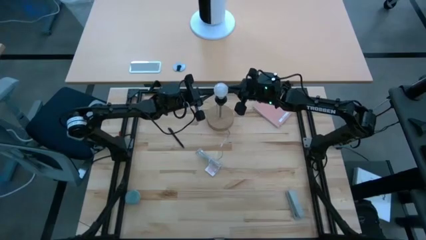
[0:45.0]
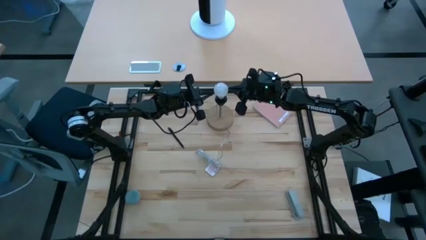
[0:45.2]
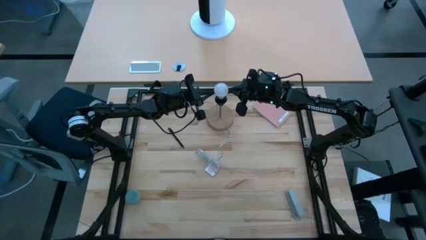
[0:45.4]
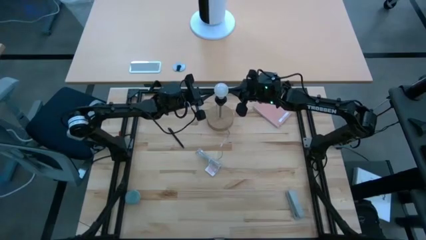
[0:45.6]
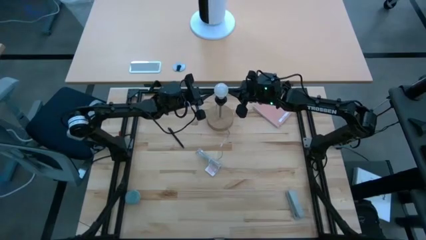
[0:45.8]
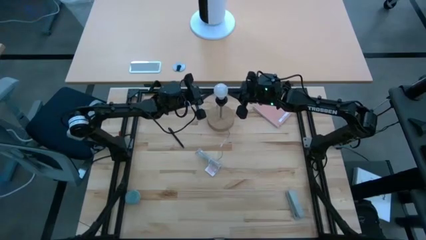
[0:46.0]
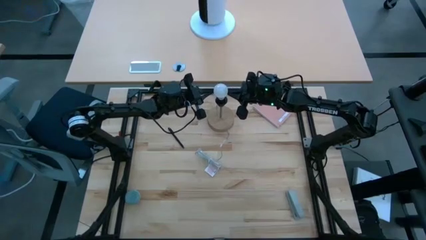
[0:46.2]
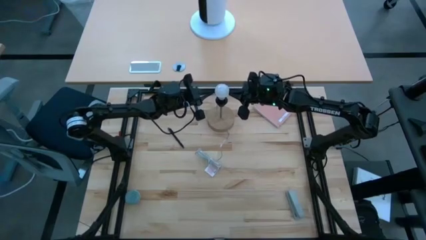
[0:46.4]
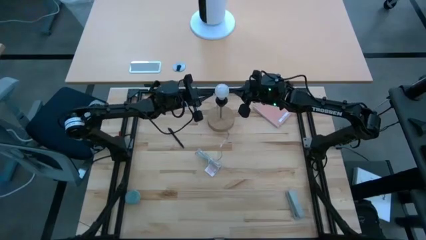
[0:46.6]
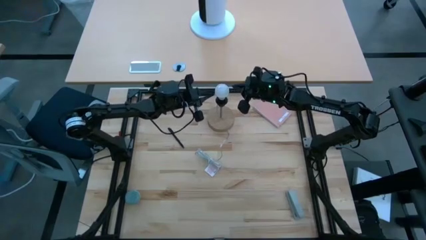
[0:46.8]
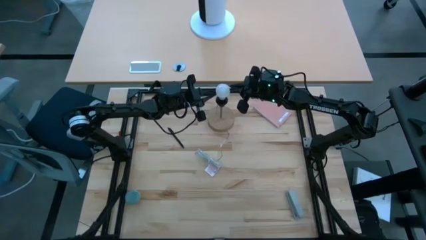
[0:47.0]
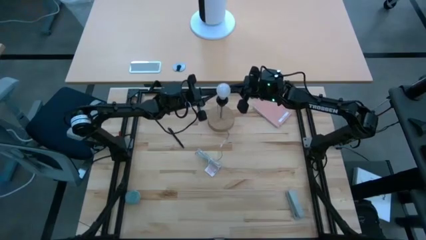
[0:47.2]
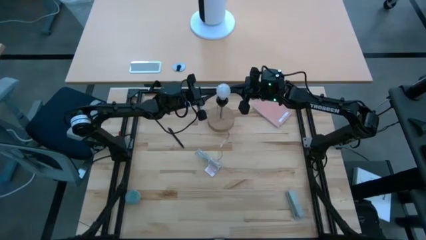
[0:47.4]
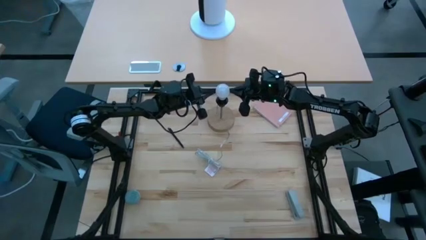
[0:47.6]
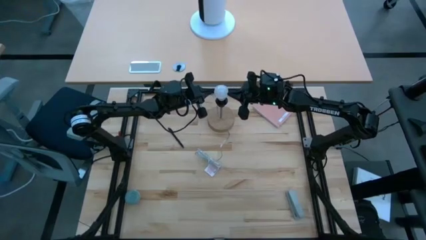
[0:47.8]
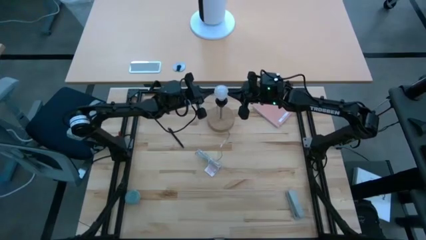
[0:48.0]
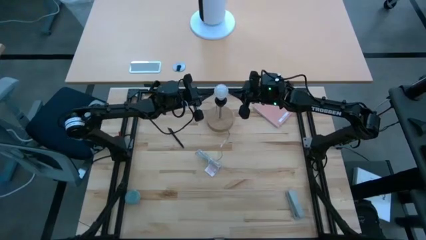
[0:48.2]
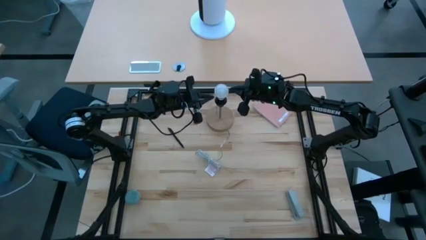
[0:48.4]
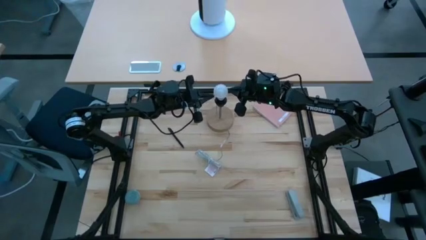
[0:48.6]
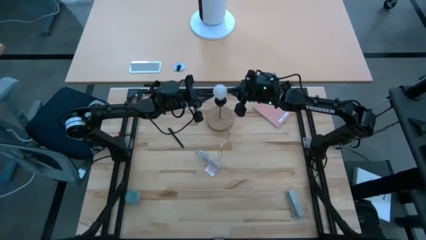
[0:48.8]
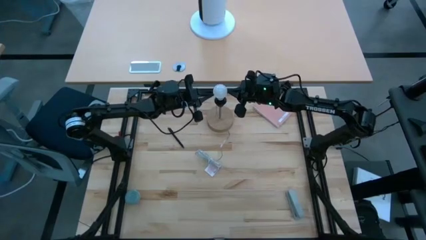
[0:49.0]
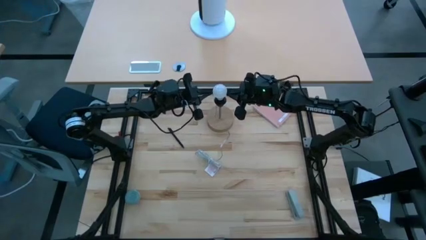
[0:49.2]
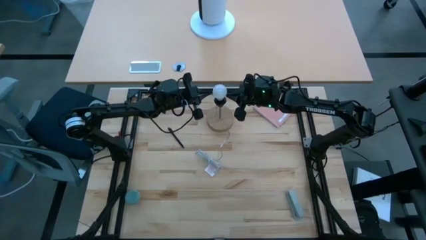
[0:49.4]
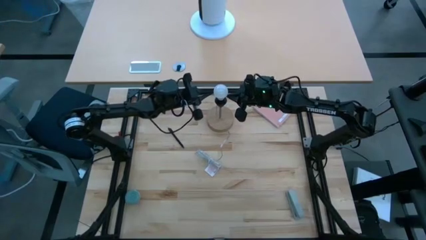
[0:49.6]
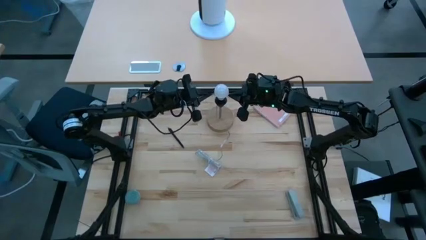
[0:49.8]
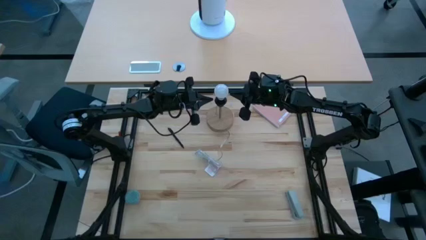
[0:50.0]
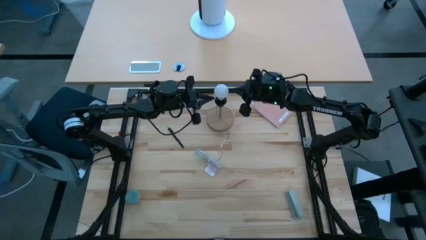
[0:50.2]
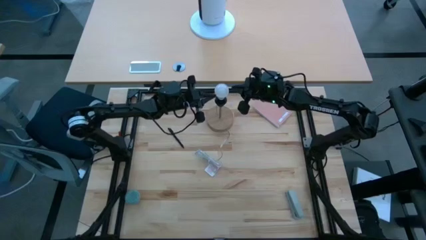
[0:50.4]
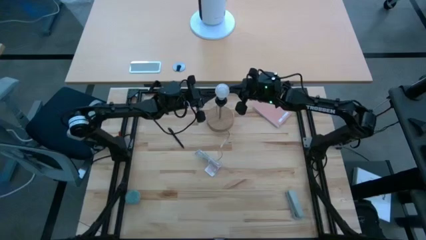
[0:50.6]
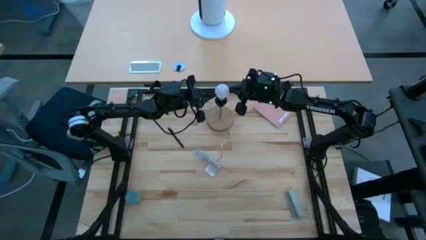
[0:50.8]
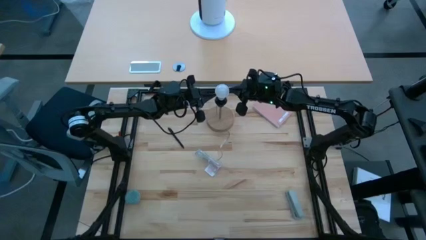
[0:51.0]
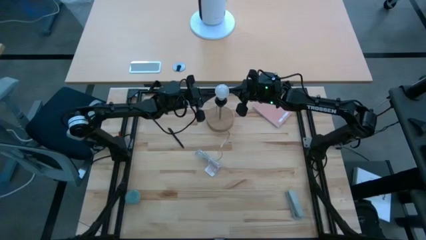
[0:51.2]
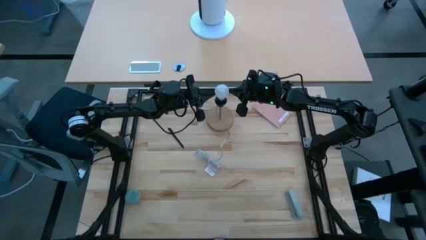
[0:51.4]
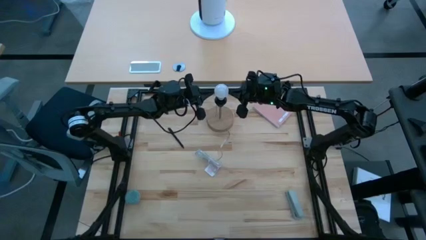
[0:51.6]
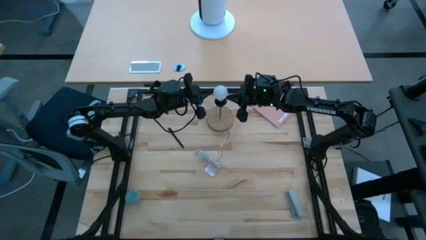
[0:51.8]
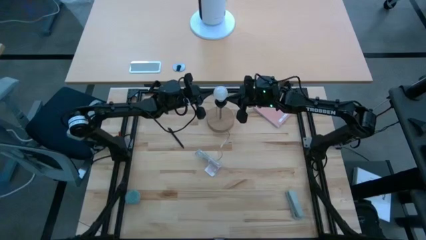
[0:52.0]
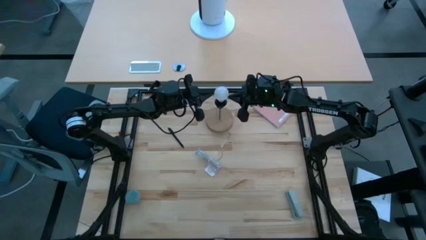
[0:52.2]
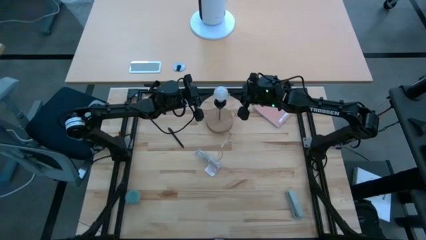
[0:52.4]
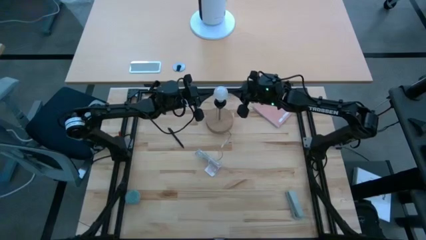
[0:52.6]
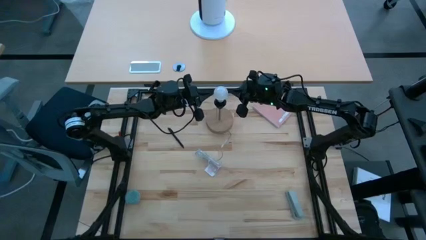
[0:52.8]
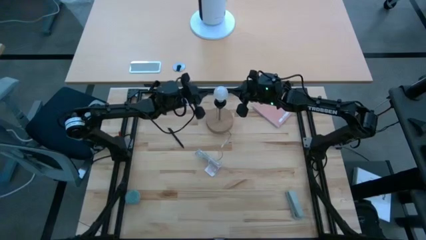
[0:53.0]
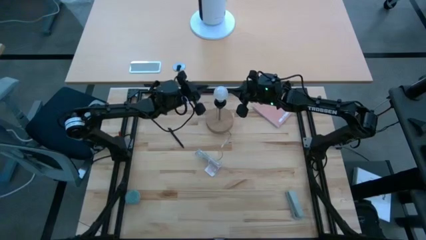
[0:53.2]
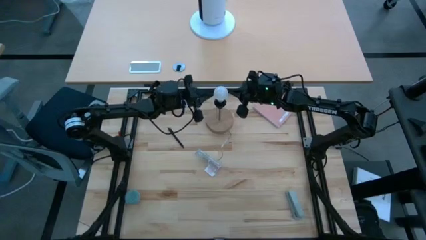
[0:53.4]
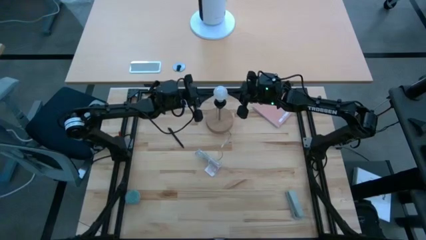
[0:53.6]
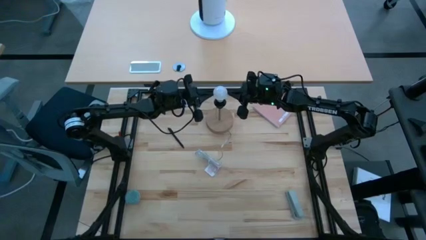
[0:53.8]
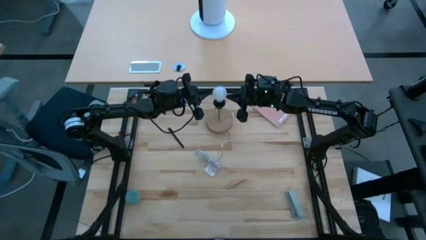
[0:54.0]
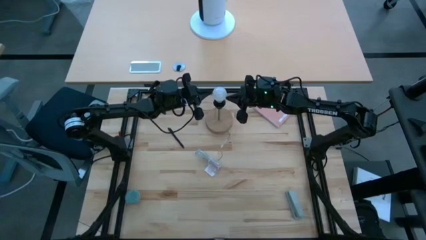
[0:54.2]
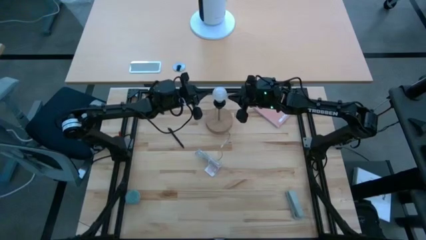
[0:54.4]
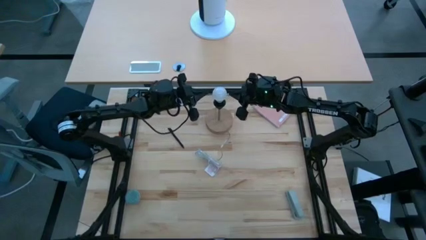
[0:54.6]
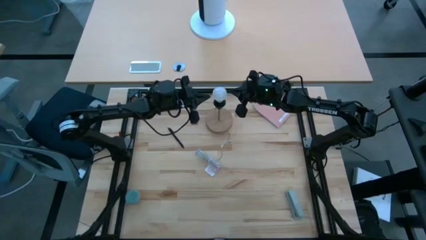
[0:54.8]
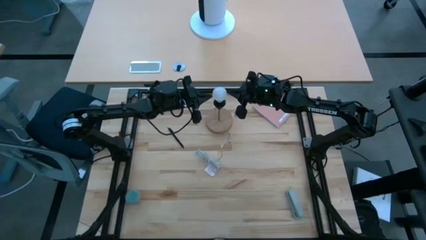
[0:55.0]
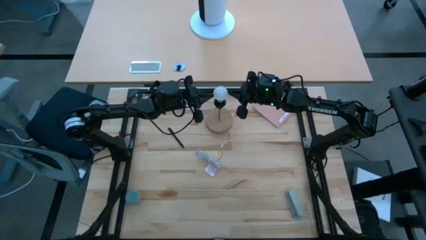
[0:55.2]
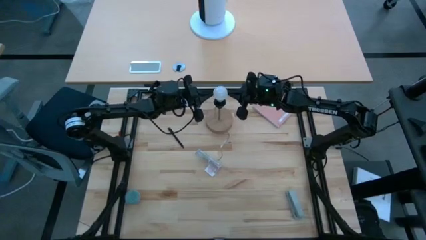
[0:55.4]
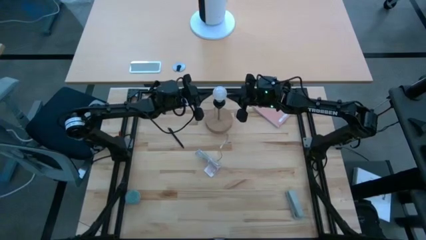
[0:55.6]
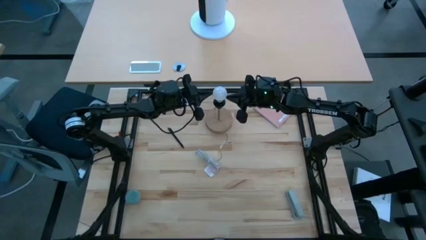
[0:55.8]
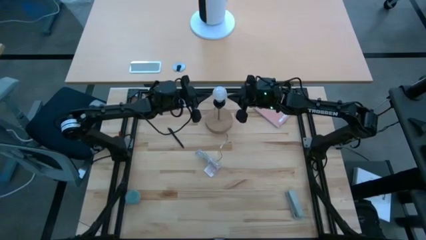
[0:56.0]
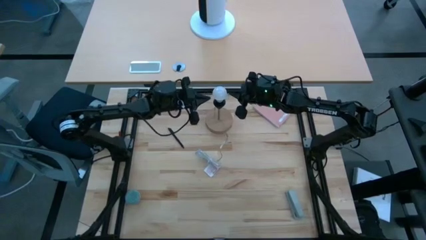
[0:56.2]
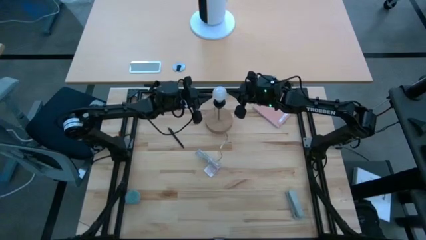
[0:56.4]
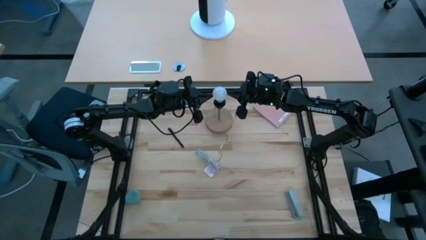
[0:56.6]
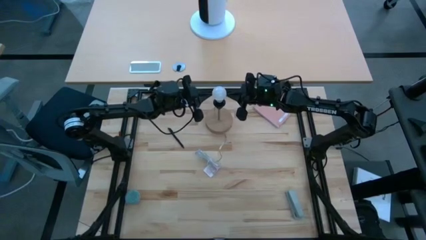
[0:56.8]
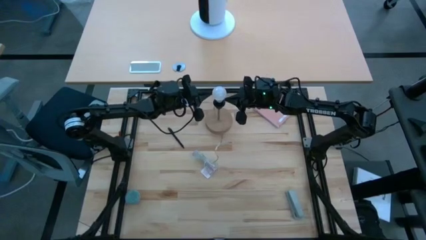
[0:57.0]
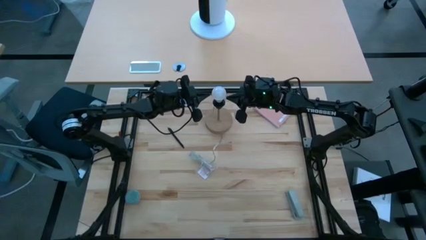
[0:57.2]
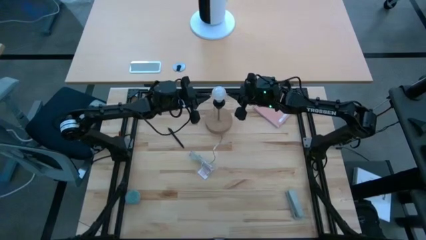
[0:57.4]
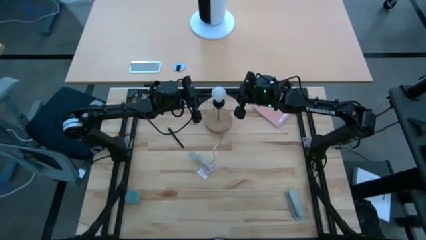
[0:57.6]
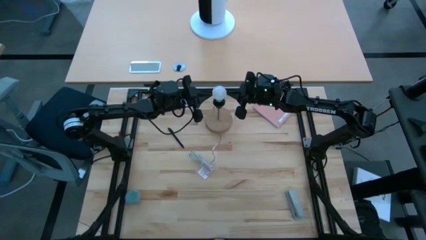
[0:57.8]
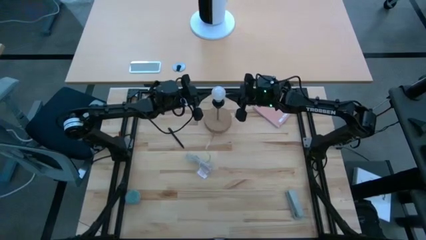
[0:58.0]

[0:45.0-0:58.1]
Task: Screw lightbulb
Insert the lightbulb into the la

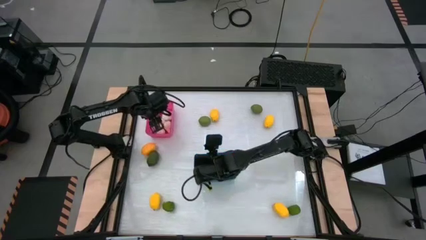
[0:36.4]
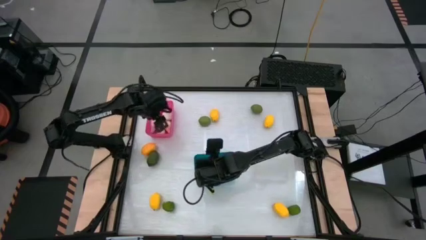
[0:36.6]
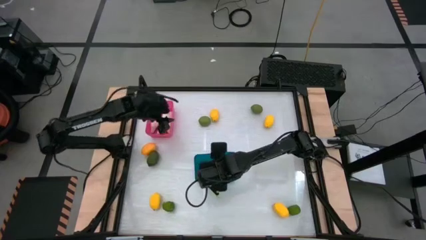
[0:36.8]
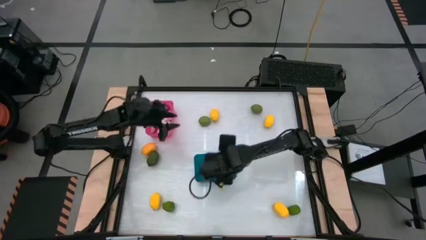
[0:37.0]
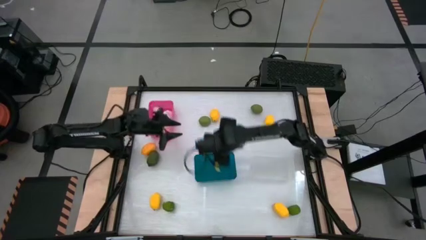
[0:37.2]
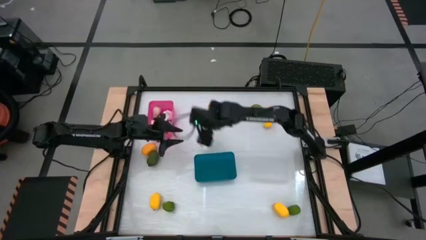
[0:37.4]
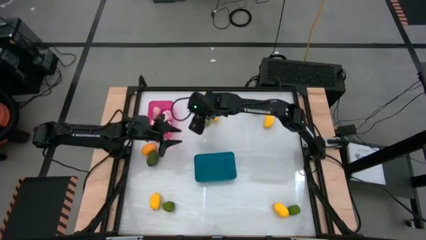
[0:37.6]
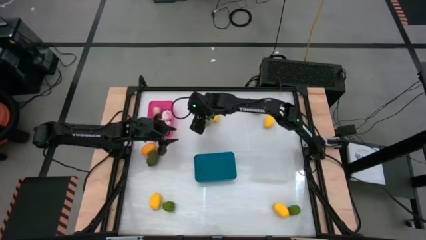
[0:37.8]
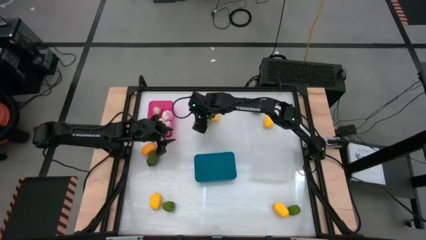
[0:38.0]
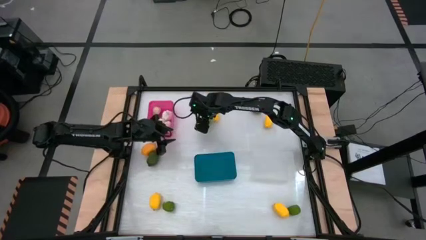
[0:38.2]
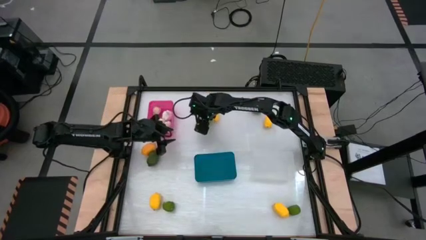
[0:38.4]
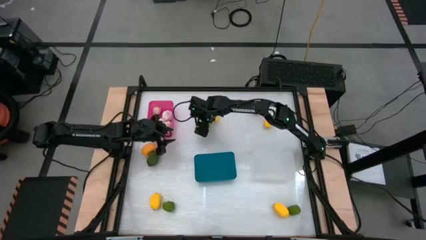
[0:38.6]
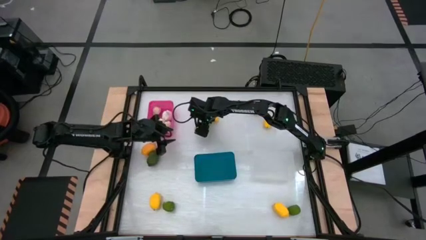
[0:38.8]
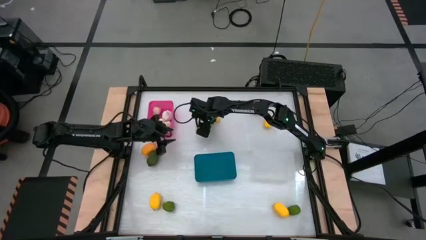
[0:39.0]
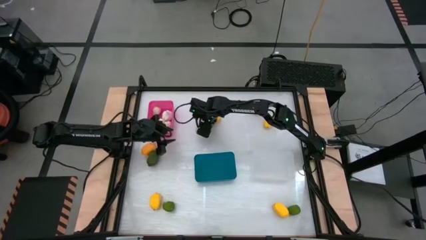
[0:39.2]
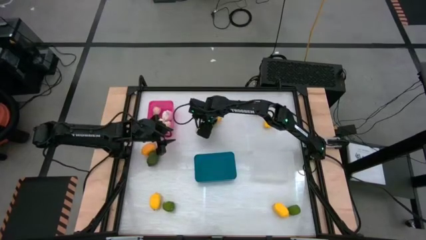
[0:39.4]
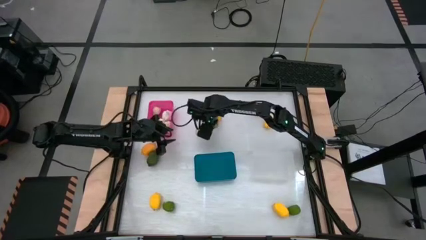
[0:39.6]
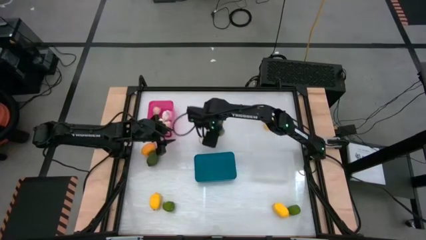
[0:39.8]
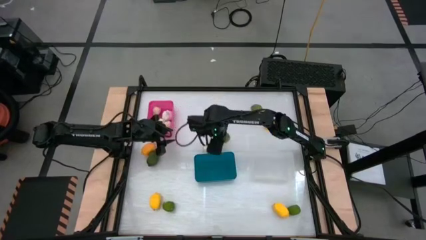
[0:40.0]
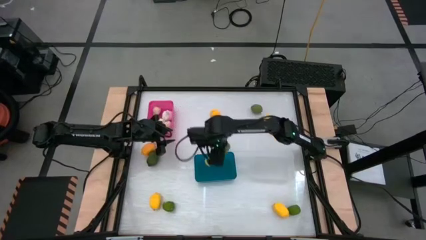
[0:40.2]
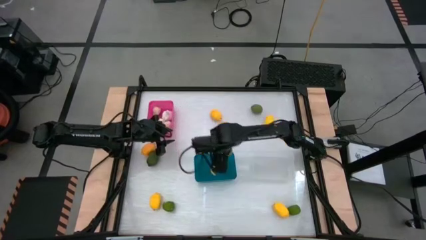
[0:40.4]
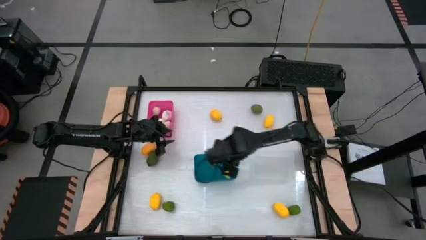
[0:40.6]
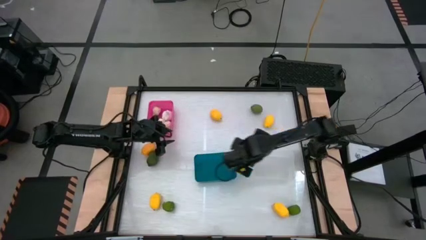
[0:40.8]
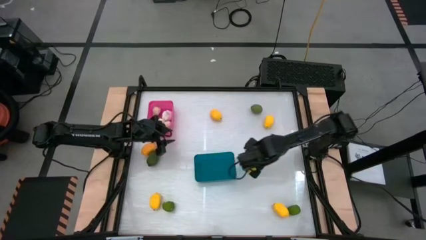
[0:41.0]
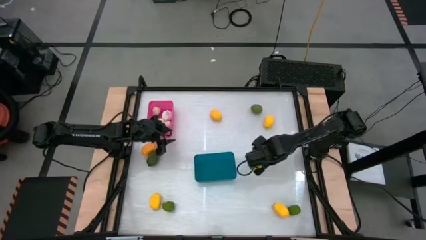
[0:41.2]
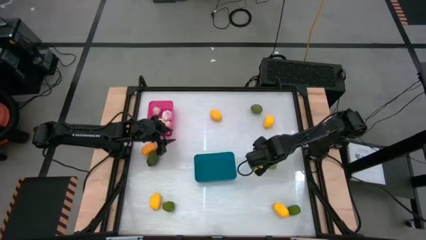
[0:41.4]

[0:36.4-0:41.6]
Task: Sort produce into baskets
Put the green lime into the white bin
